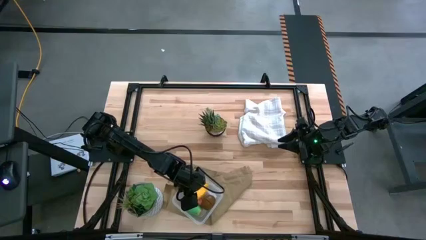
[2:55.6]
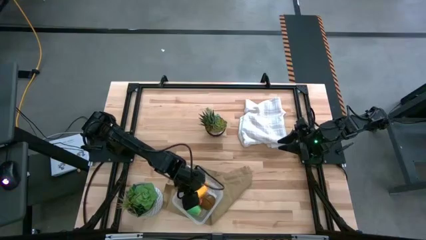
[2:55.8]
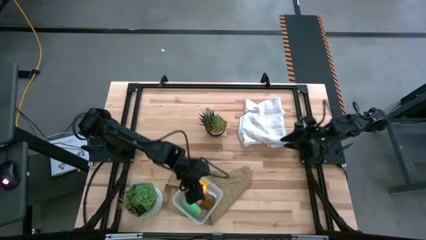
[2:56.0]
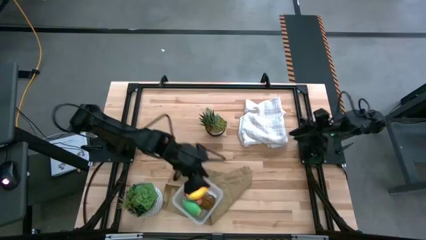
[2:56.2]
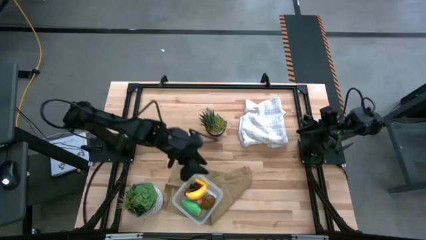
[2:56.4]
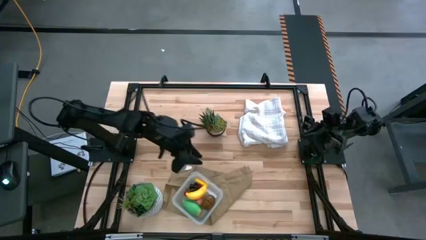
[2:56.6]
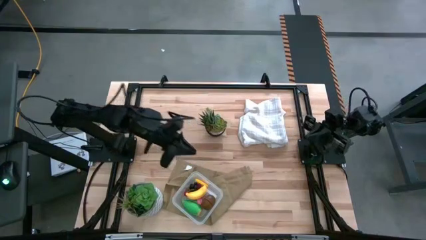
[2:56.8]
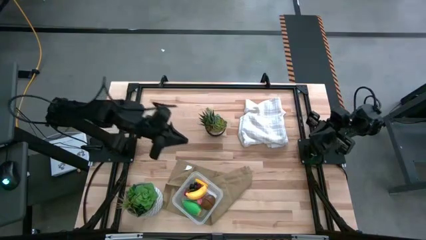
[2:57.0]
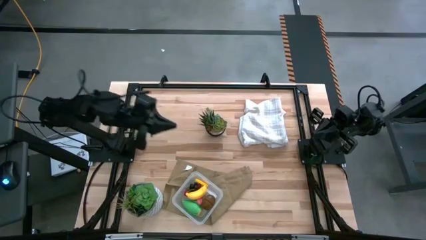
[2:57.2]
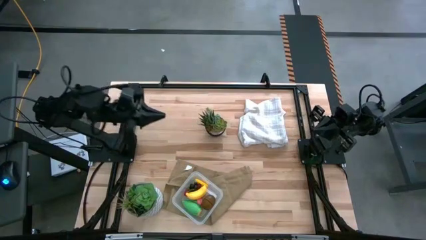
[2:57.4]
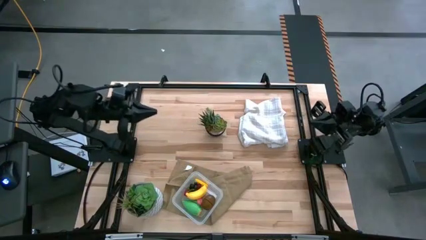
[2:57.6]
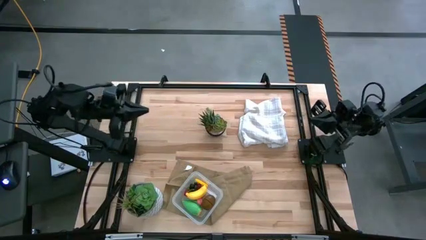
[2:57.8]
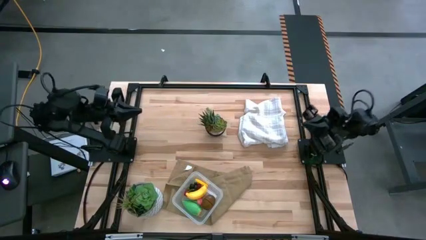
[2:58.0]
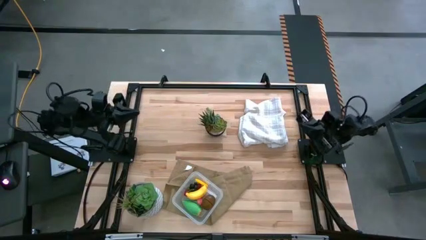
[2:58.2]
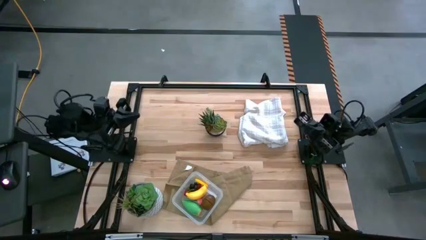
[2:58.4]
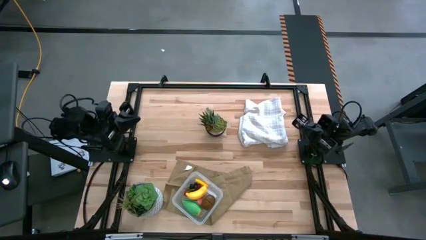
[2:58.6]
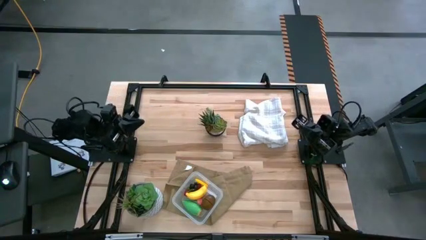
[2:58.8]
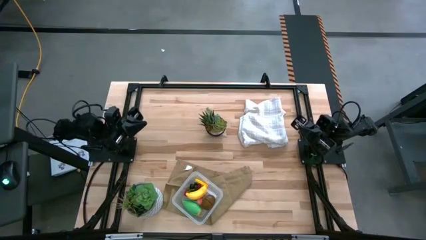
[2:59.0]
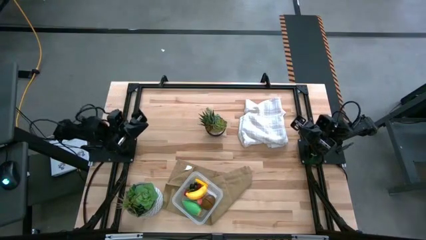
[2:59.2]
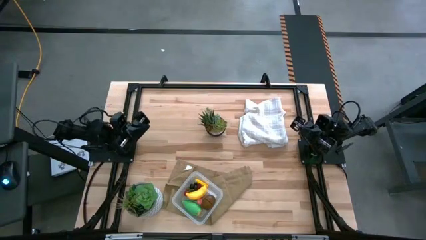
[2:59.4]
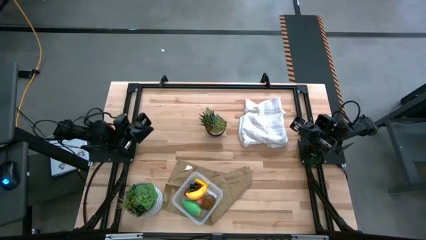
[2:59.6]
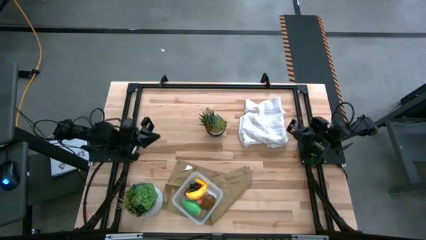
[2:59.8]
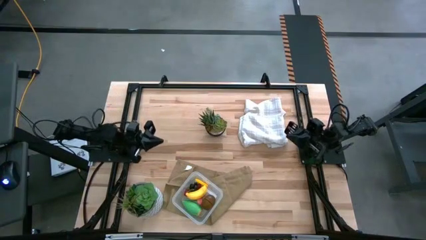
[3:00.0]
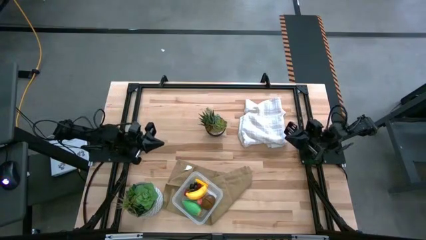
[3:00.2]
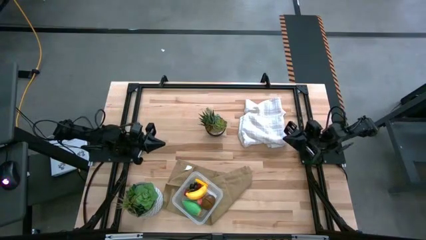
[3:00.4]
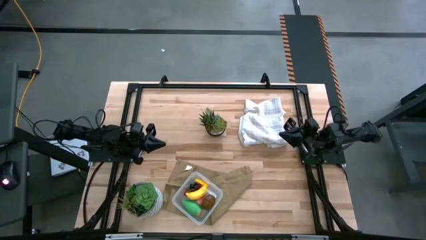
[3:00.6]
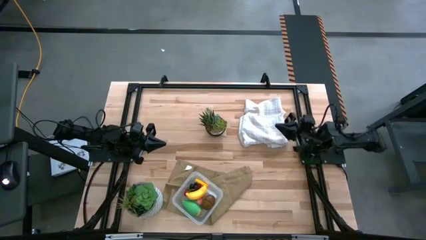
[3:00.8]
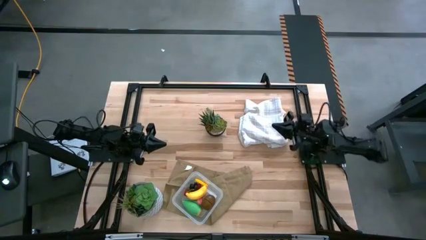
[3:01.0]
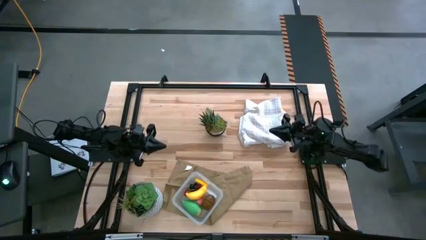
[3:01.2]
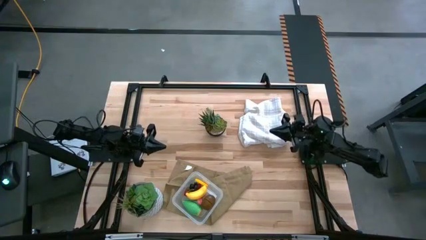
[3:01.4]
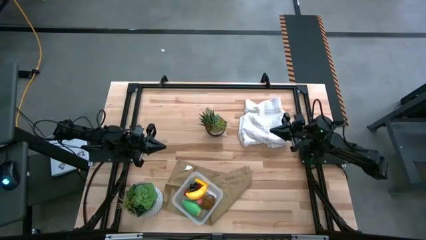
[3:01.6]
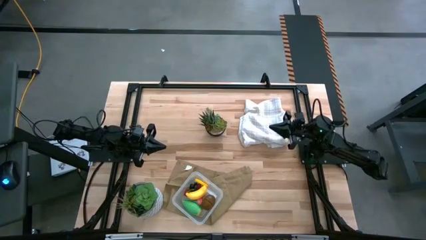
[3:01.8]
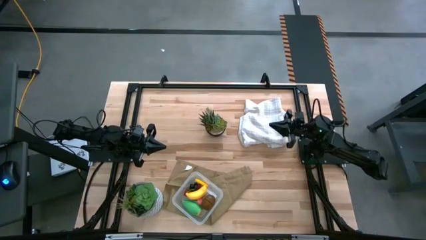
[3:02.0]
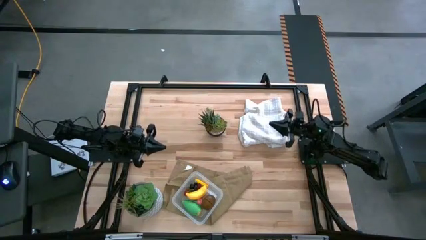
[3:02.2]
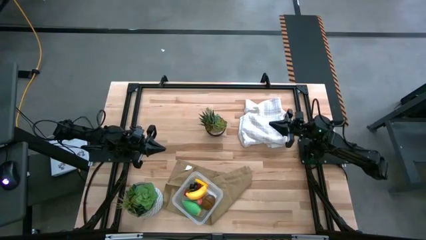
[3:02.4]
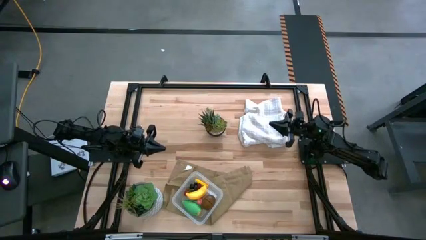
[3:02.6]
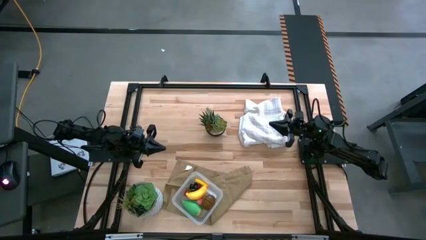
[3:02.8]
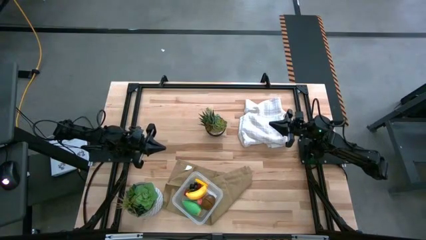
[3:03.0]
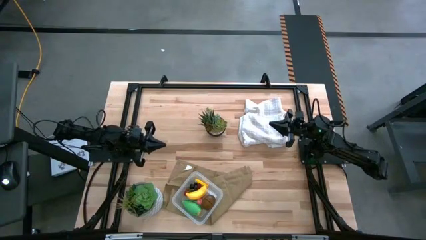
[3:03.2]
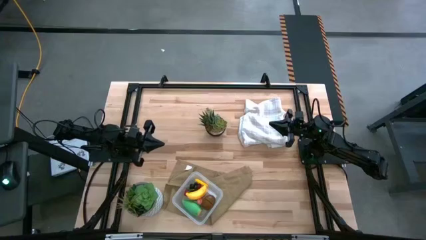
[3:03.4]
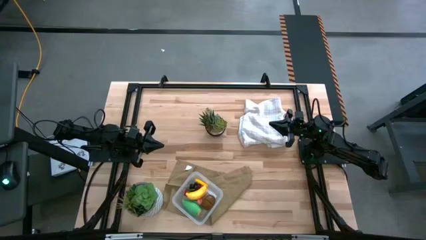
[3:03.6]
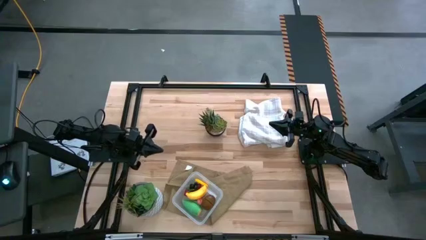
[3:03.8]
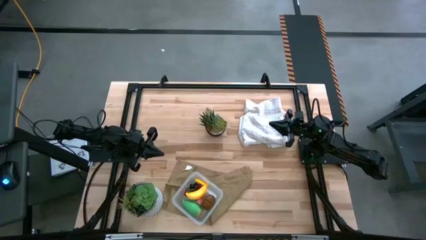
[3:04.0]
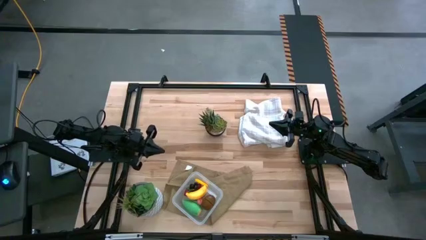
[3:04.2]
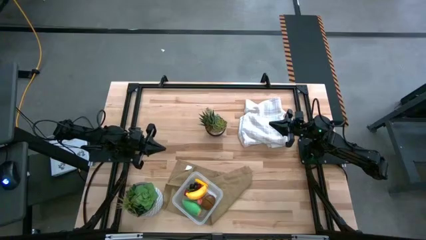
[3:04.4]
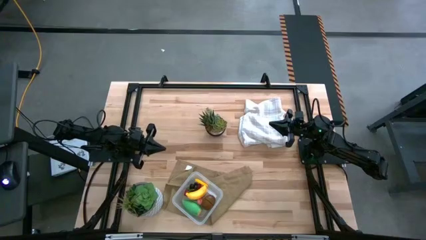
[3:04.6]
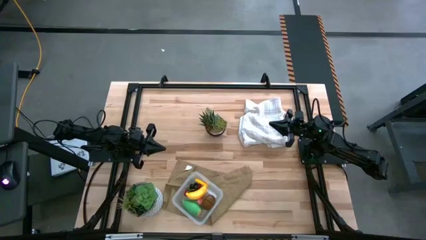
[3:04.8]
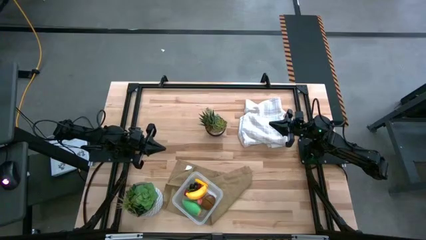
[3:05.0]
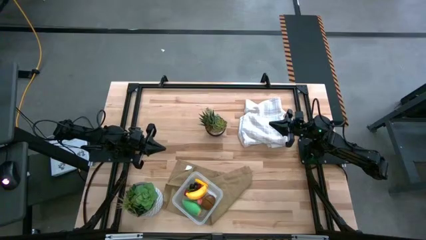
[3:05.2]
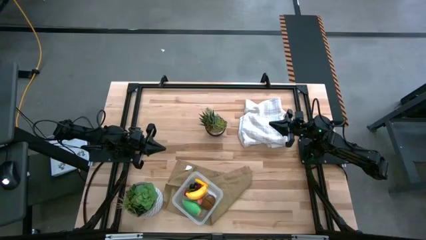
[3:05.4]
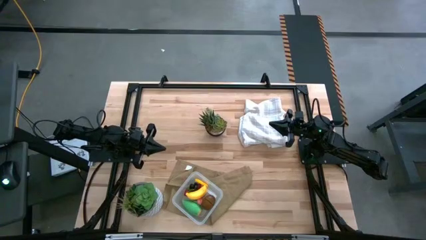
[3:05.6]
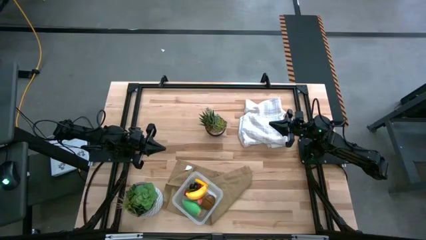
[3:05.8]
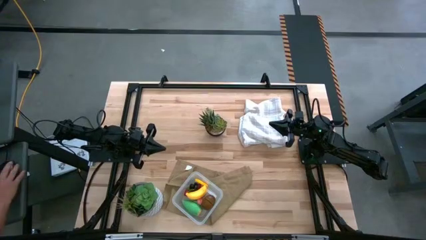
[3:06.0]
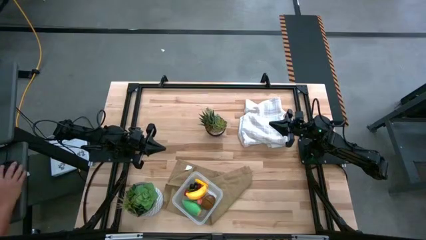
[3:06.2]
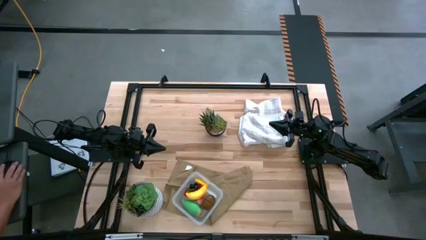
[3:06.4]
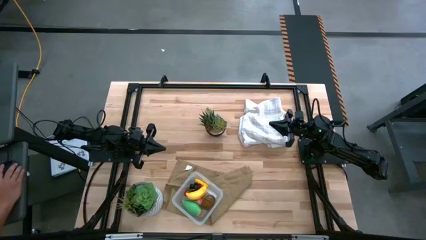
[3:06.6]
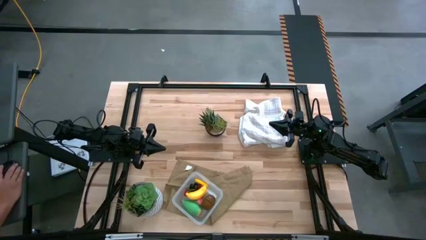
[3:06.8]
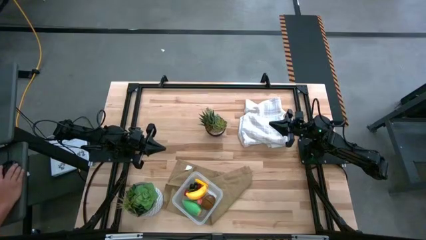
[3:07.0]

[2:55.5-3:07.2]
Task: Pick and placing Produce into tupperware
Return to Home Position

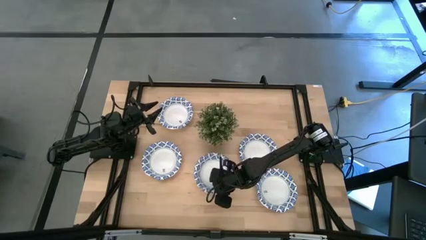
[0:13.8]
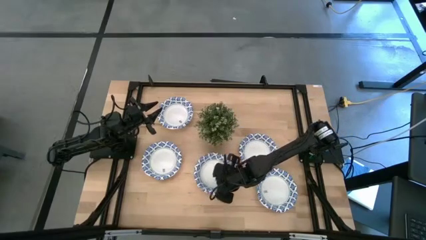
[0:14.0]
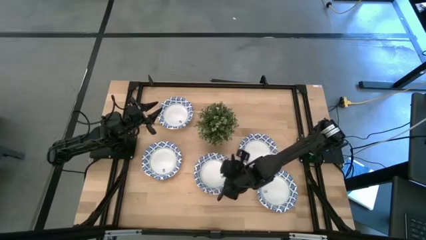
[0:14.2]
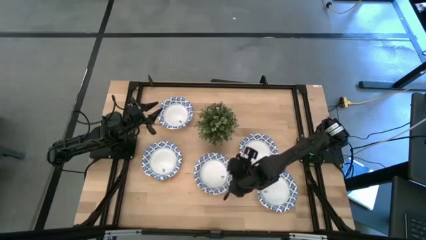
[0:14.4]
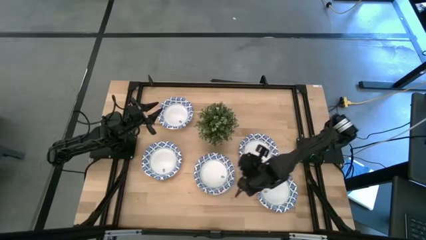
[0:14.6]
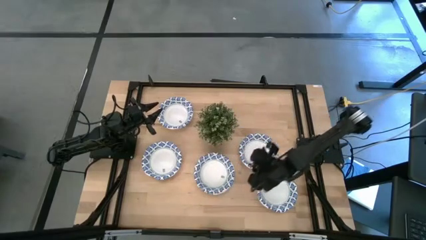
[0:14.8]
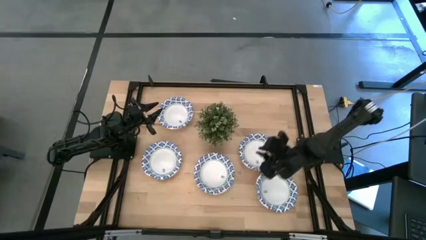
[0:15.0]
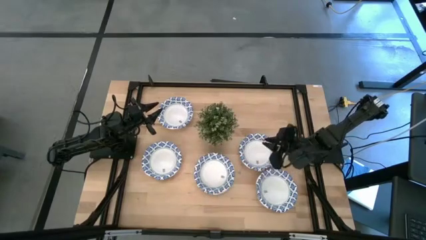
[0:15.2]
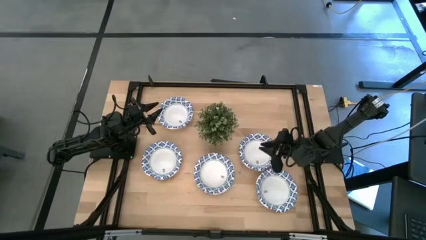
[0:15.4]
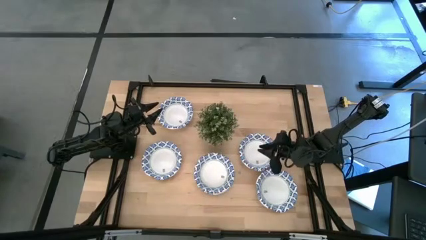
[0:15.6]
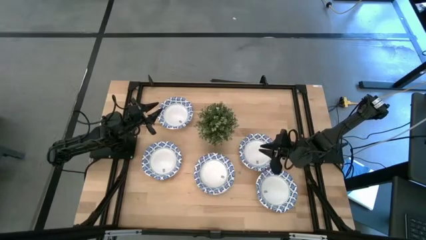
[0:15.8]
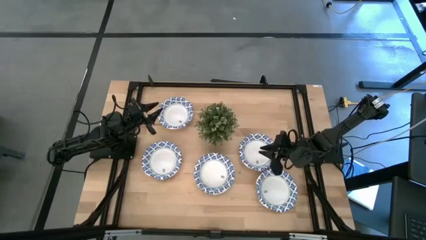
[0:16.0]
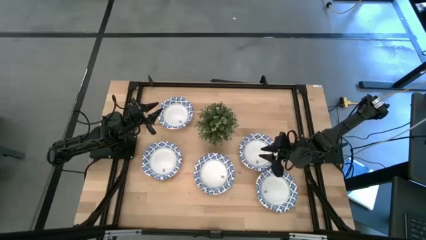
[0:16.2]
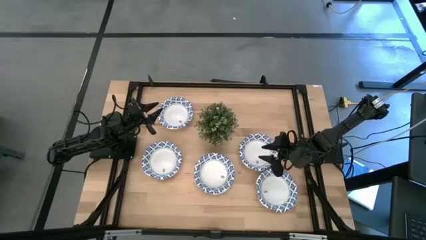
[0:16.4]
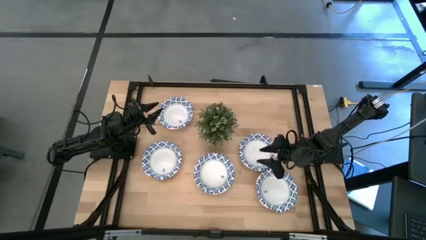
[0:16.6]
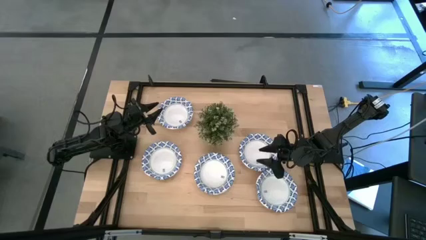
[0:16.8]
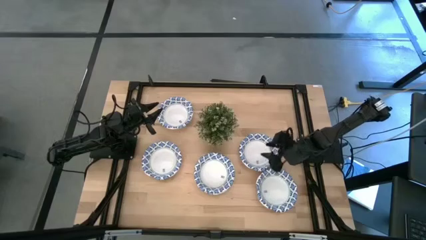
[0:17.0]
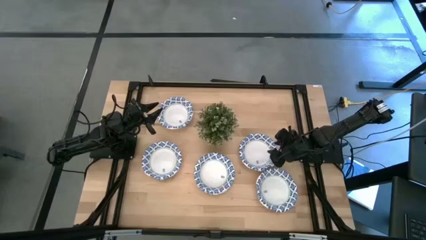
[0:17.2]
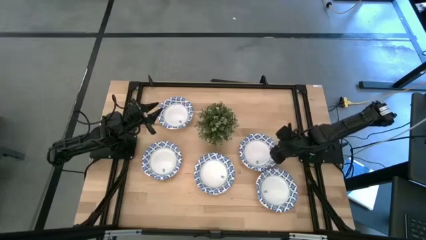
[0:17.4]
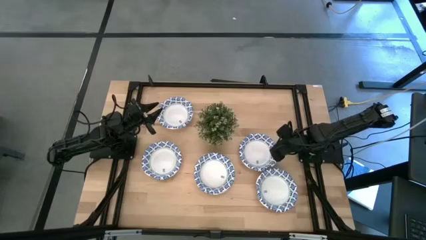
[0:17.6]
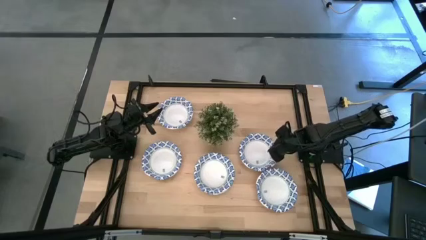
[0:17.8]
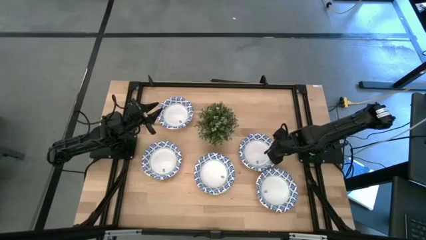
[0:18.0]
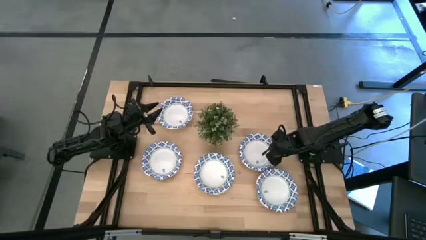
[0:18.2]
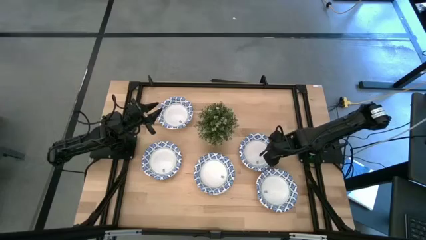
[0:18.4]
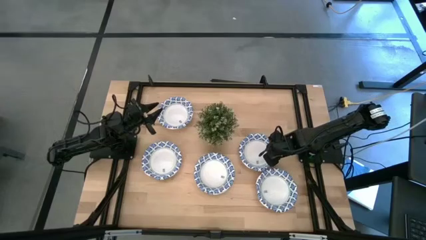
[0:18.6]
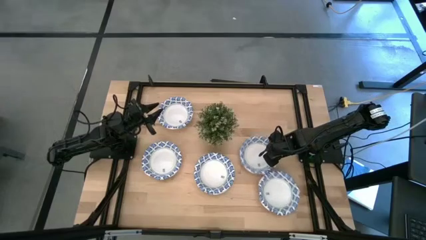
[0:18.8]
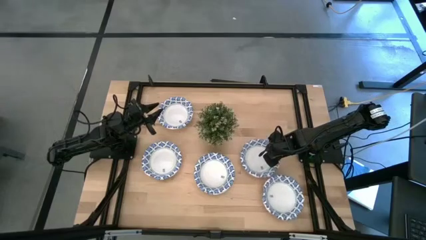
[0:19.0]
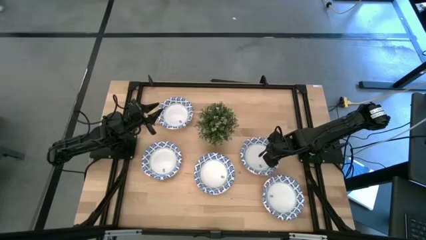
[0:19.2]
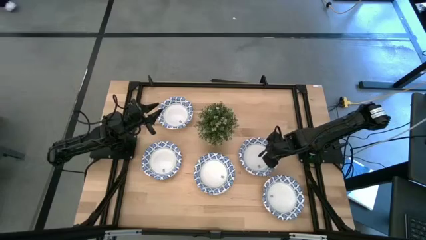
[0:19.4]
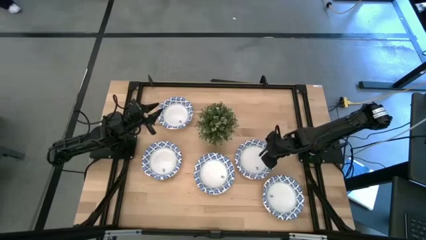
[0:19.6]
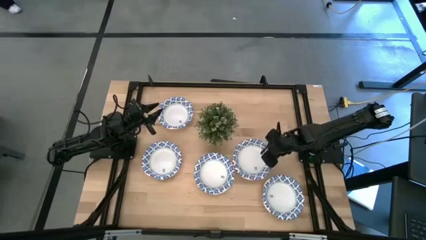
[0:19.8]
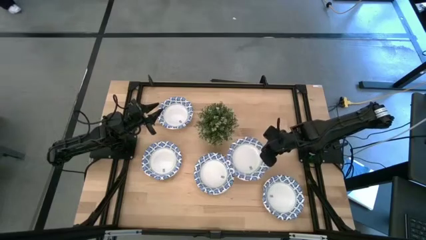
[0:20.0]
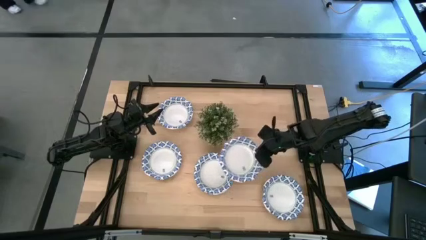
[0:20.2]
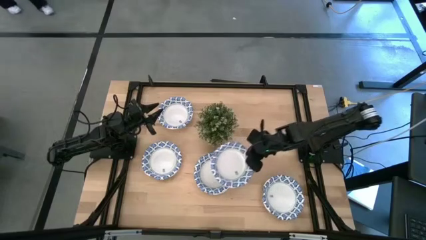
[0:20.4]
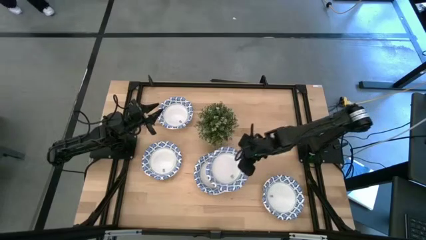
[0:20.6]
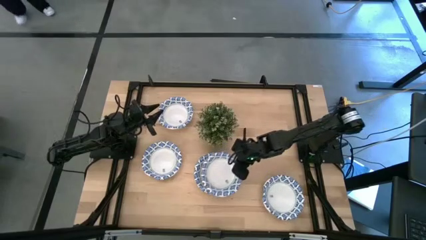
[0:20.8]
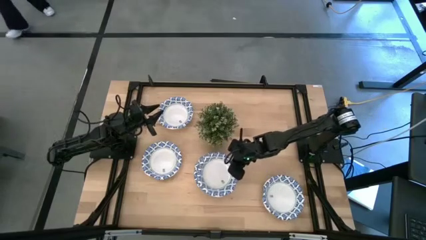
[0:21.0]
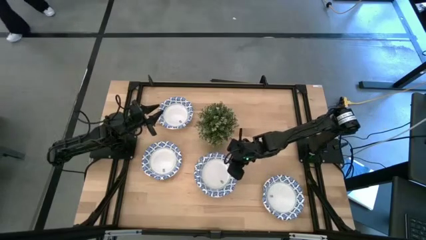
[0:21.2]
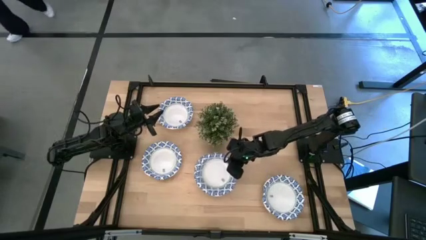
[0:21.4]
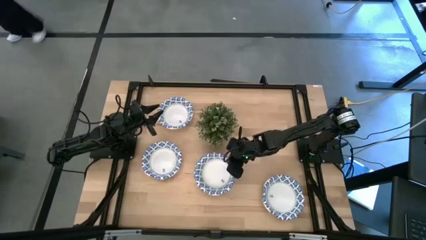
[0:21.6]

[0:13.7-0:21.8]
Task: Nest bowls inside each other
Stack the white bowl on top of the other white bowl
